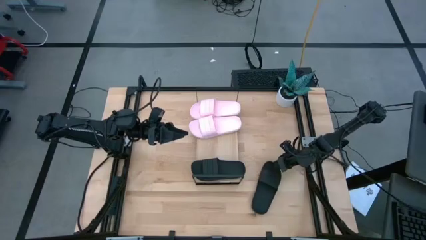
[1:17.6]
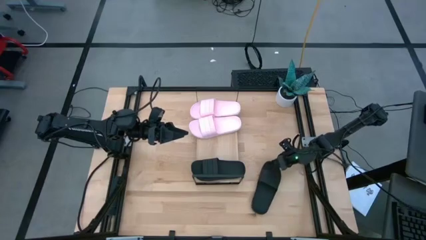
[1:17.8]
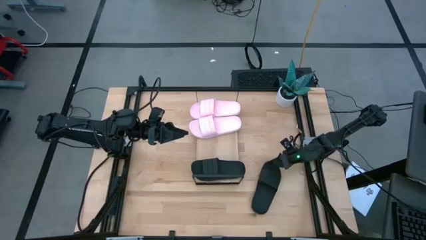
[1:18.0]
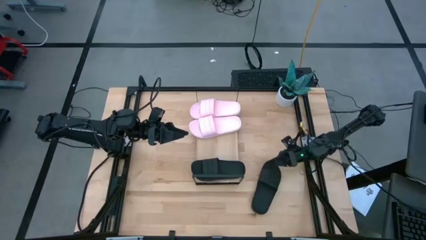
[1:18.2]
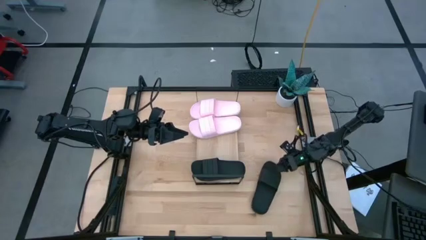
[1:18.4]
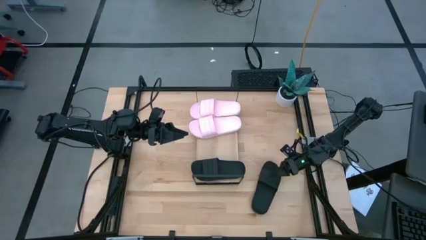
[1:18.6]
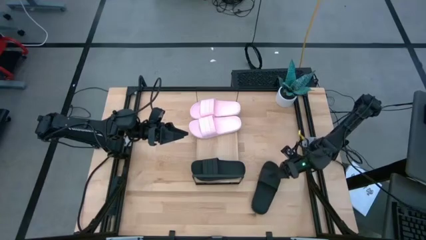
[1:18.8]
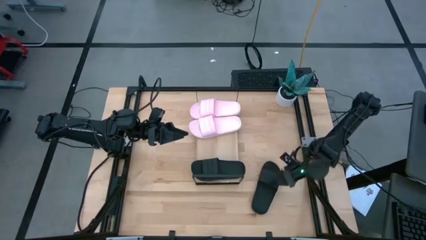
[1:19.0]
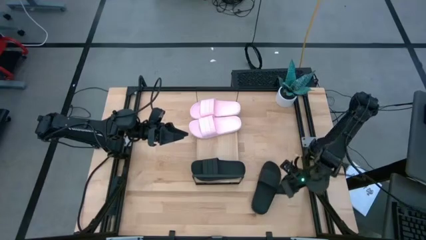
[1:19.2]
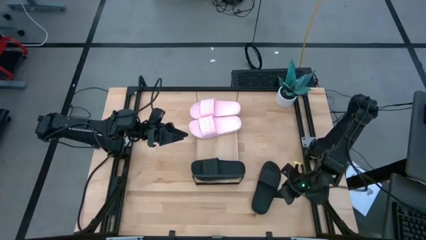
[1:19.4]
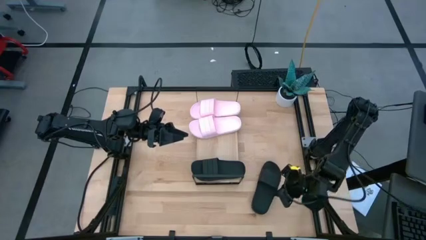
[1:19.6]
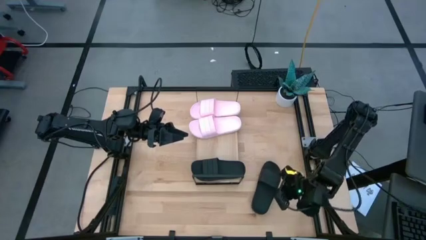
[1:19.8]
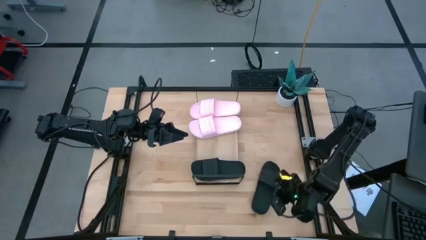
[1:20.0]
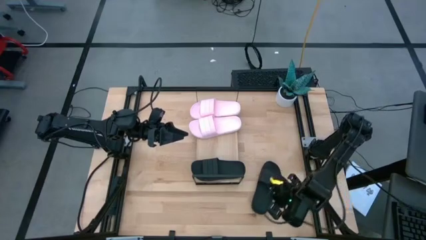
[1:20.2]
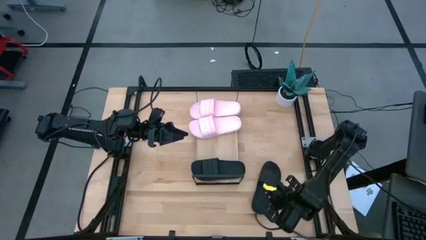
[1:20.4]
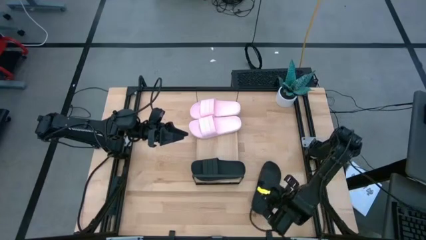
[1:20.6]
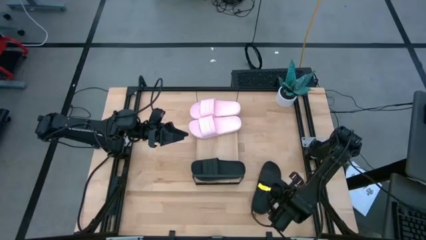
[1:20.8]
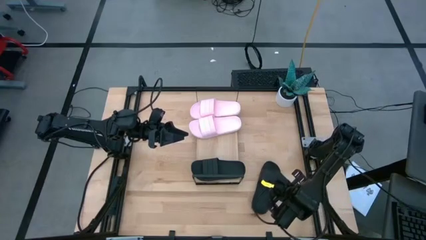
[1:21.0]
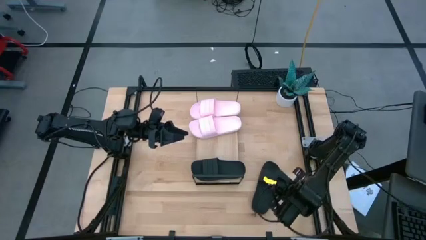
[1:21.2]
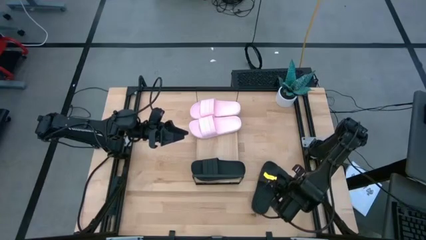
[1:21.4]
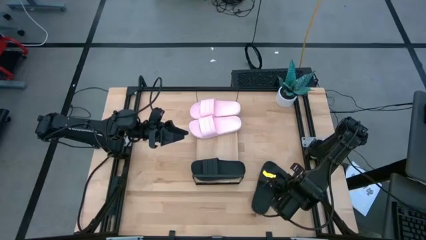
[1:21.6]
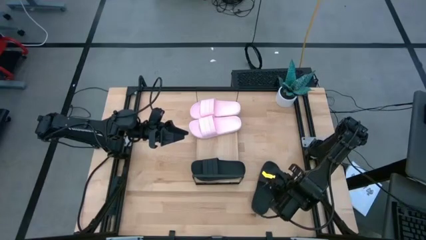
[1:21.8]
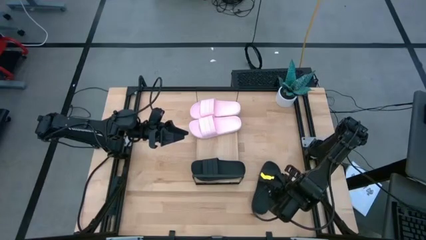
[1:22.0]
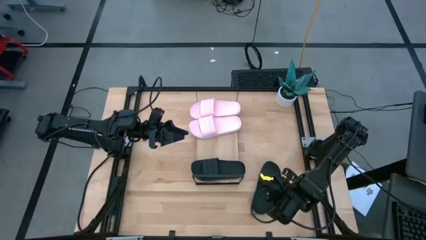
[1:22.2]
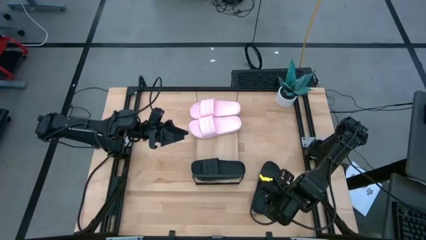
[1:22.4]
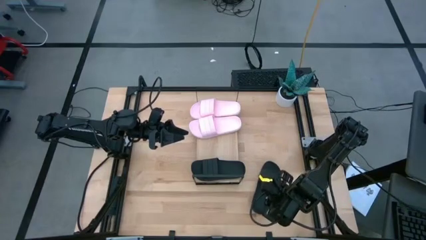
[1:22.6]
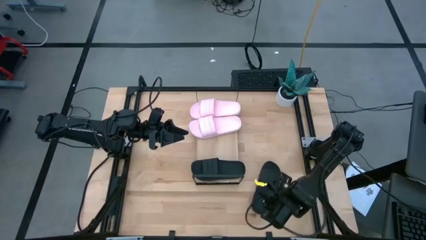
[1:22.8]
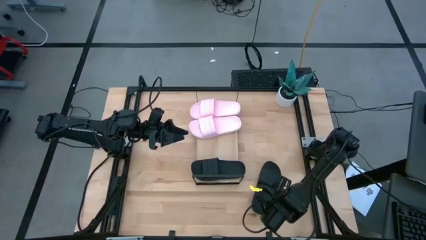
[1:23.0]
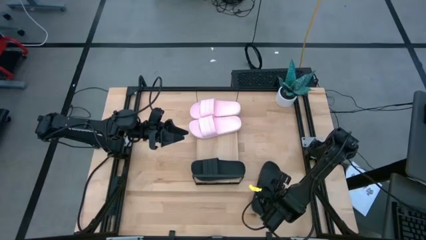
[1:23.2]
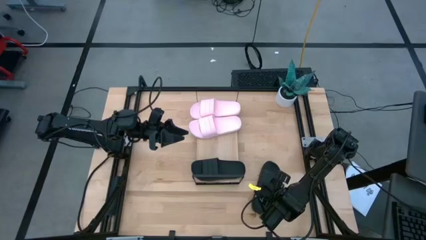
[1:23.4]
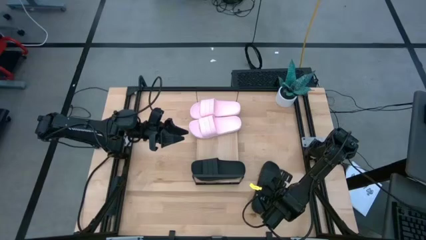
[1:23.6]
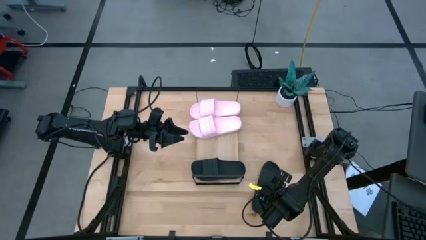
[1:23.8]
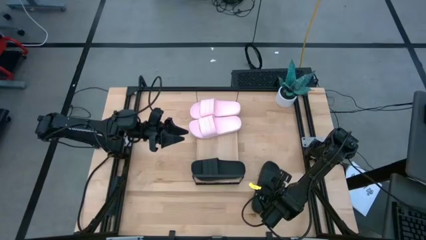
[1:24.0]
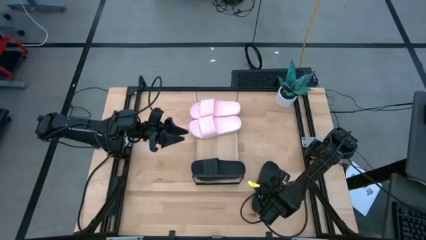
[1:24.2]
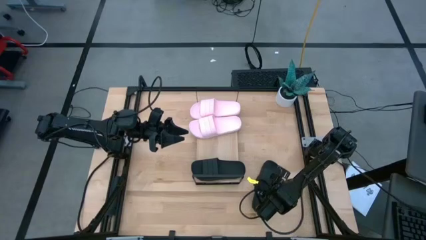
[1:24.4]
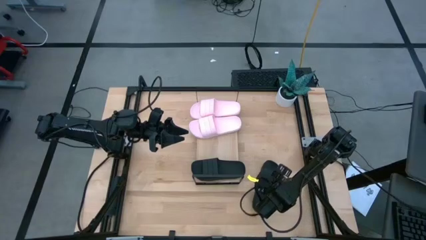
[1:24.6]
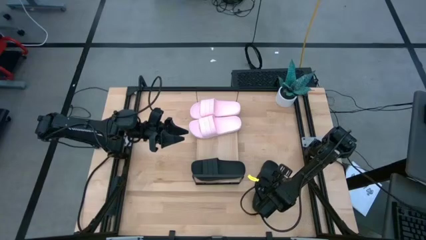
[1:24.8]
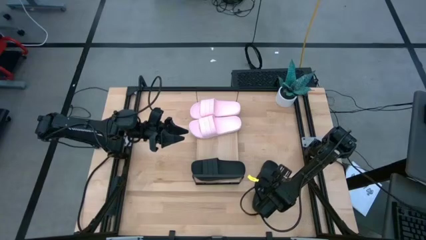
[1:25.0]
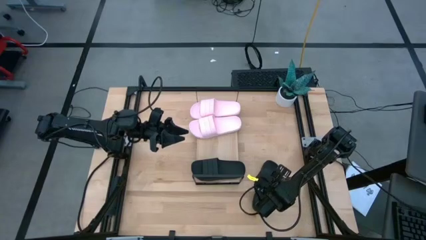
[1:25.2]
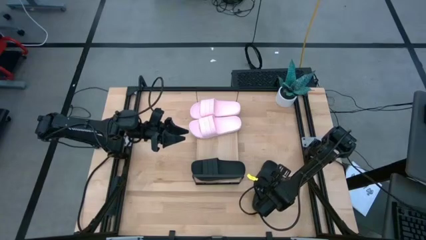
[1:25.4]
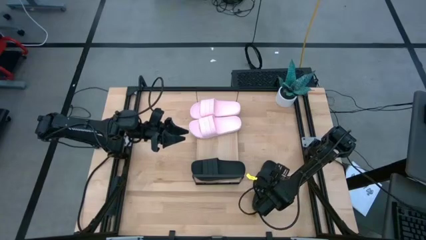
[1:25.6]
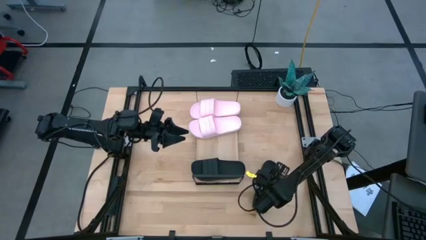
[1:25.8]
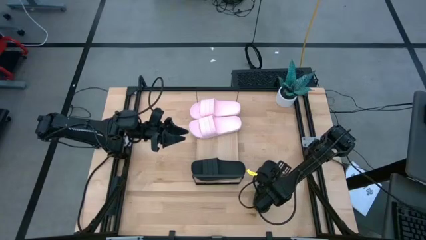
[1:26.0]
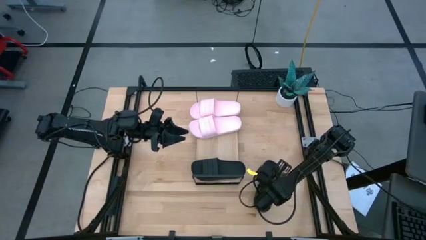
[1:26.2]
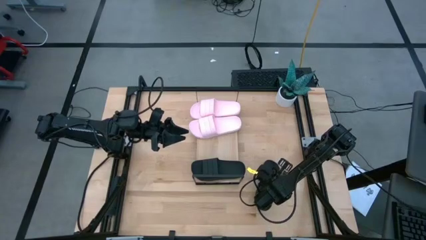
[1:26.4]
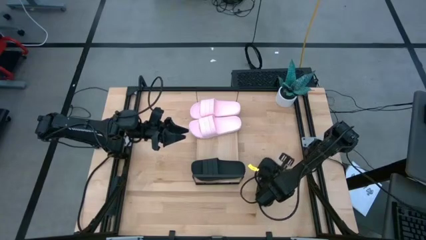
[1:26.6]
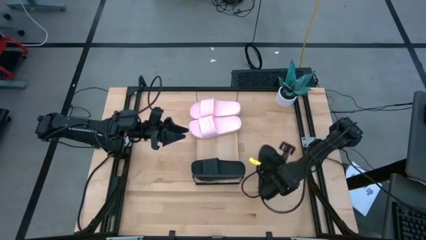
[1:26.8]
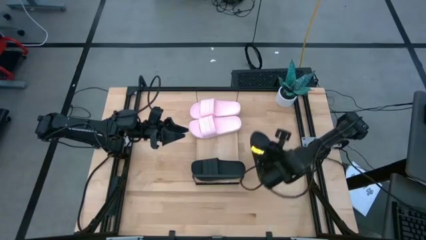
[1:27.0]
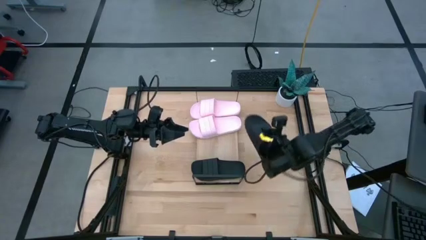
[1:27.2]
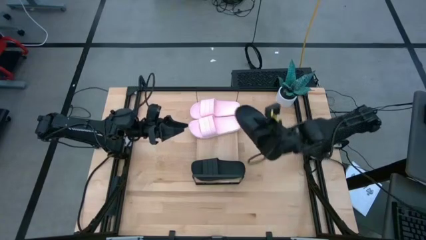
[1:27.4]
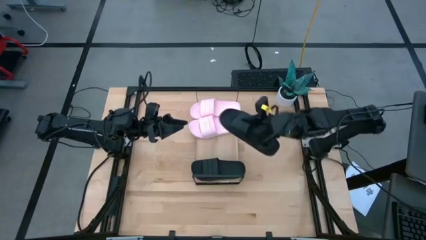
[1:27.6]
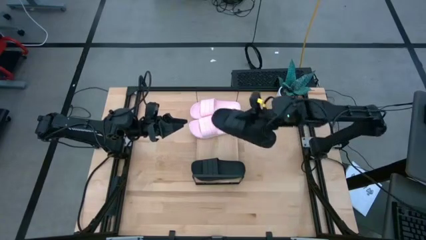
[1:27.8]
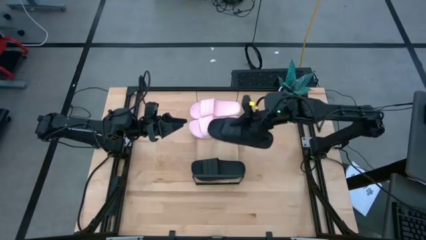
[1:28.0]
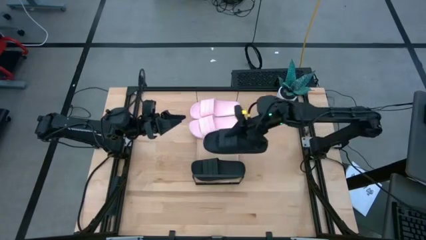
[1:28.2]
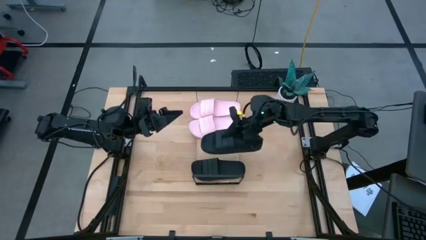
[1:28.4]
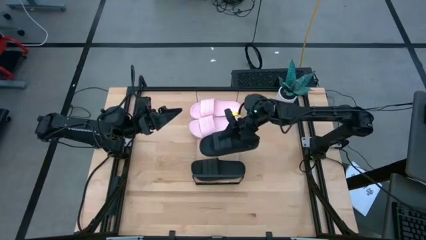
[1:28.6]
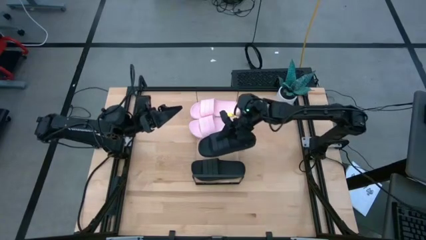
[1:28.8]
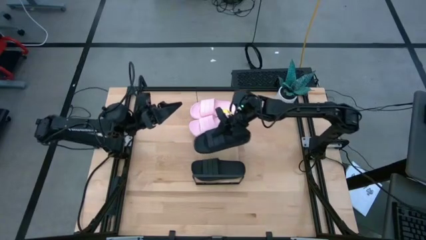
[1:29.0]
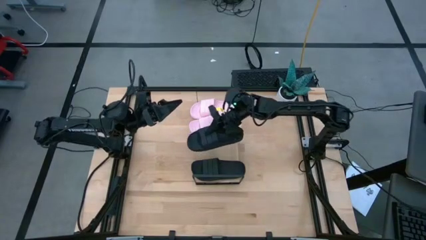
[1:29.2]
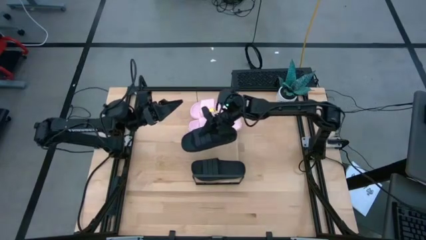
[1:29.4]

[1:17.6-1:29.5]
Task: Pick and place slides into the shelf
Put the black slide on the shelf
